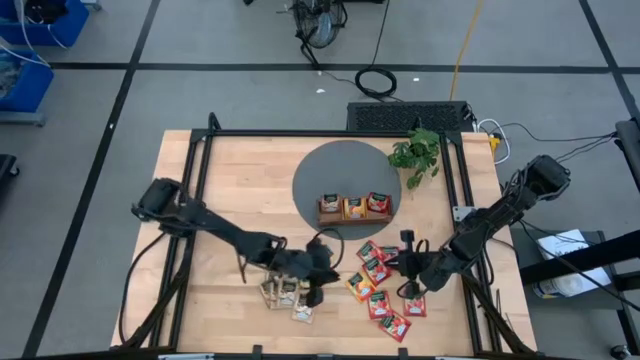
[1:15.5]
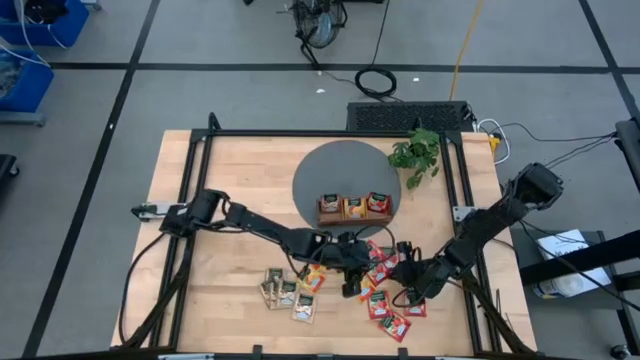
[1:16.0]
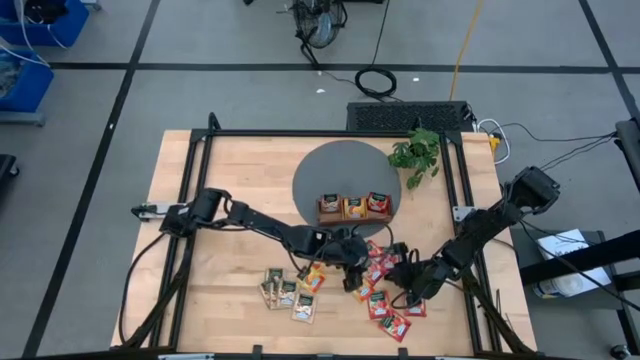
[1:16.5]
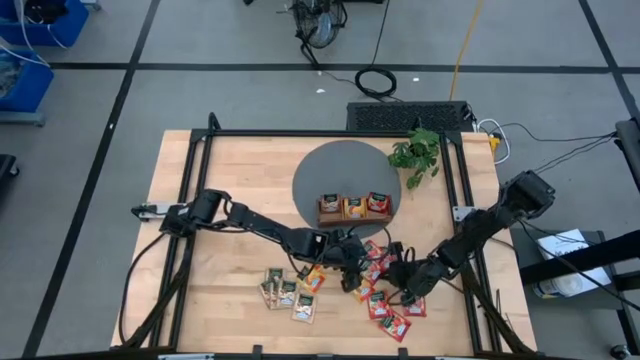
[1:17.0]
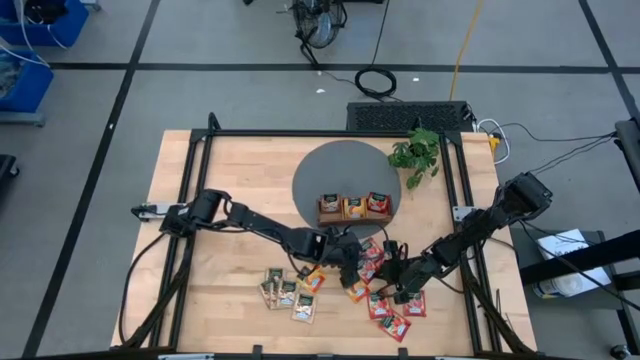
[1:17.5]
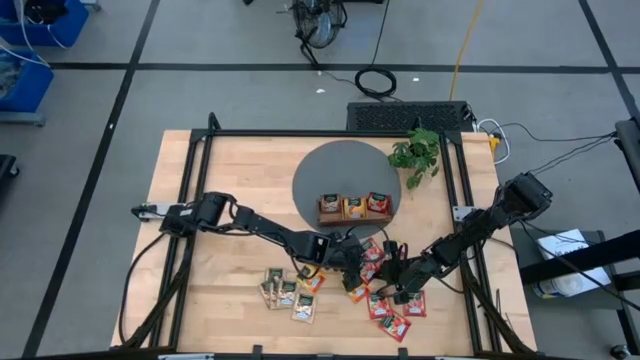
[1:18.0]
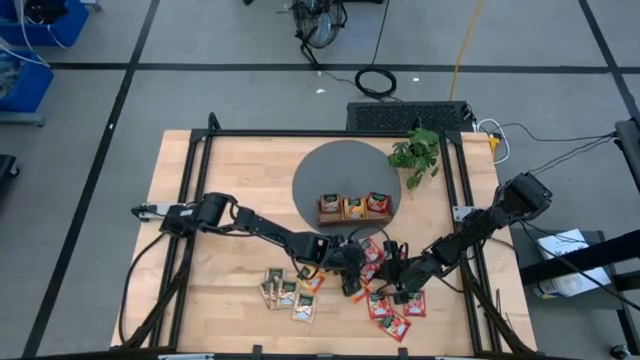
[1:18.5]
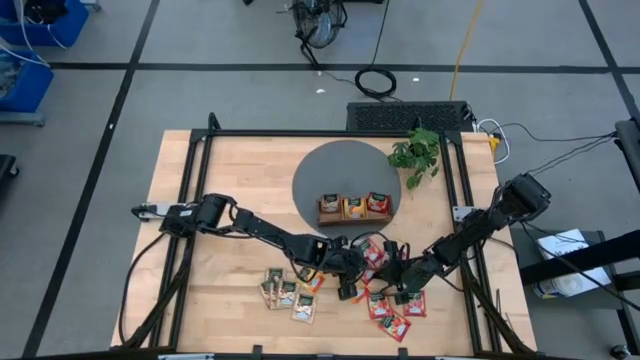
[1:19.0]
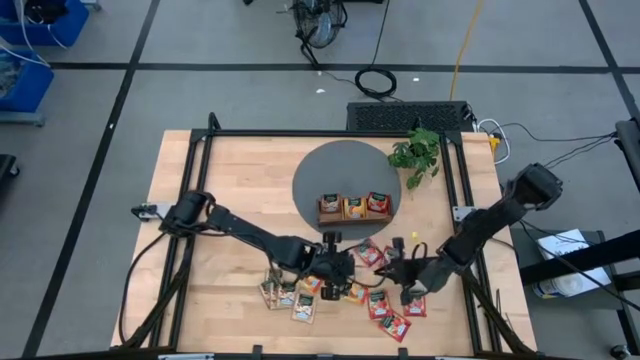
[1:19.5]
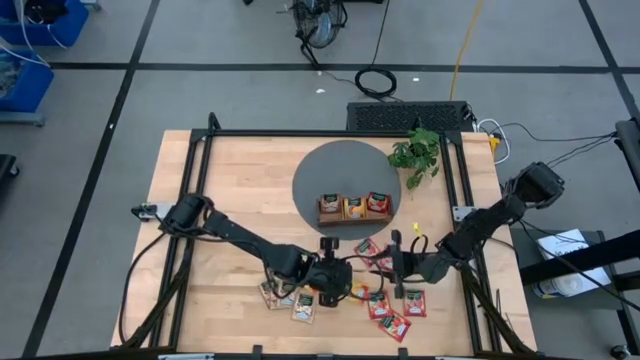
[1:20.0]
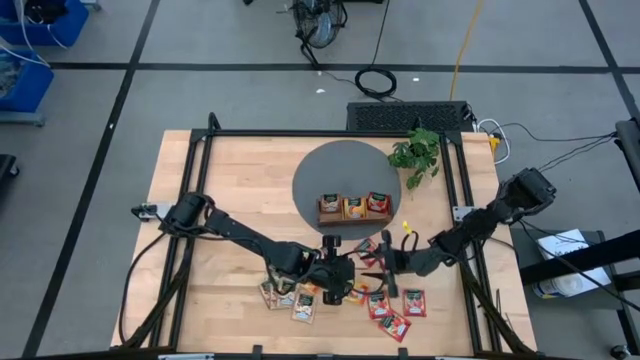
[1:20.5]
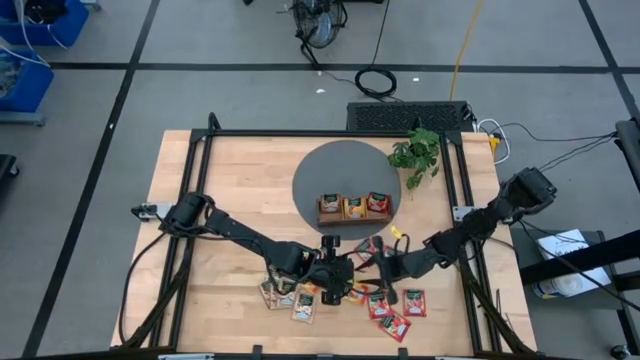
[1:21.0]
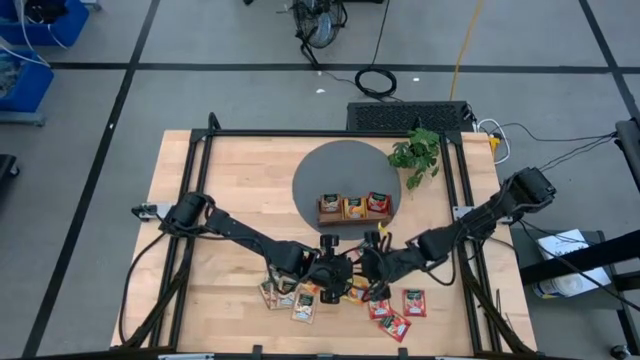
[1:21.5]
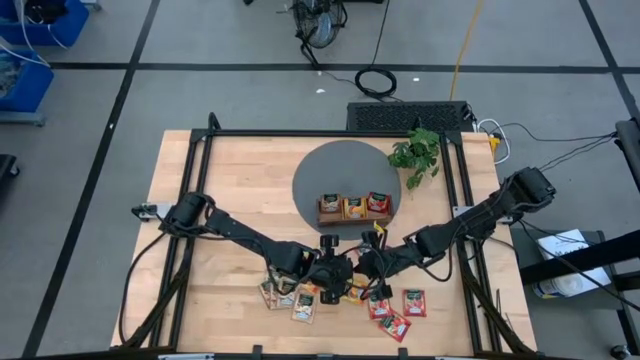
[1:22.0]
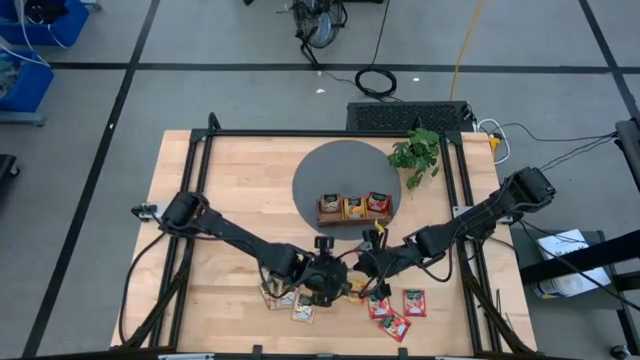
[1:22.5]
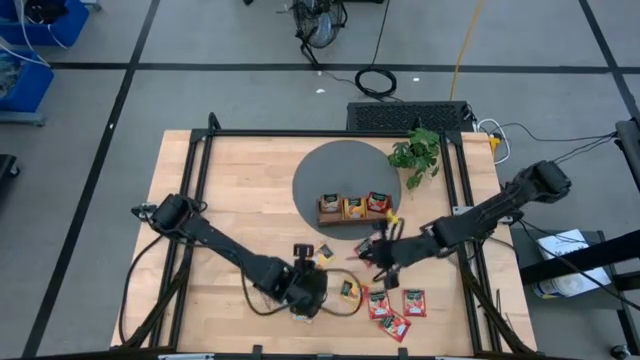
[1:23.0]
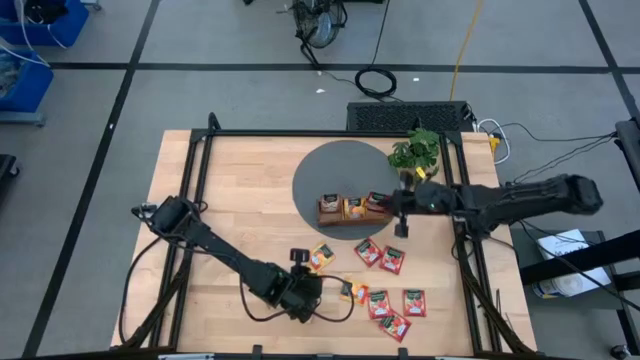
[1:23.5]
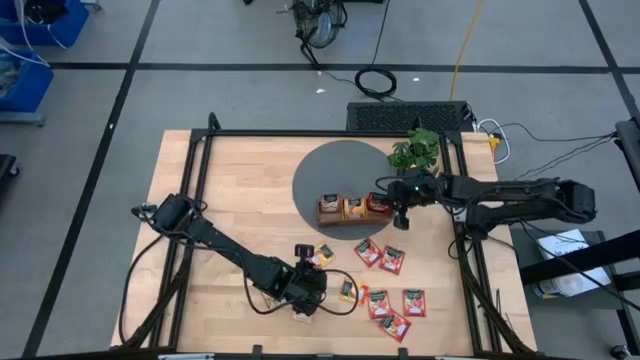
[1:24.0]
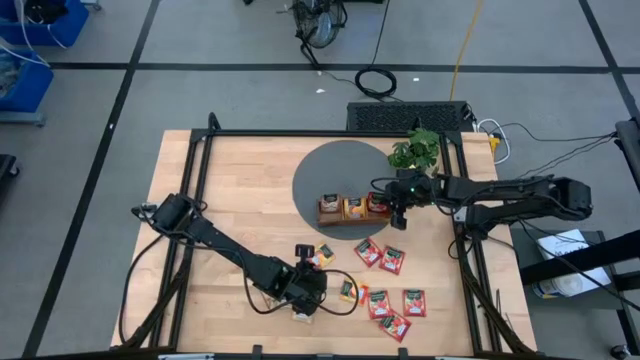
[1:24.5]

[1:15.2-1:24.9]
Task: Pick & Place Tea
Put the red tea bag into the right section of the wooden organizer

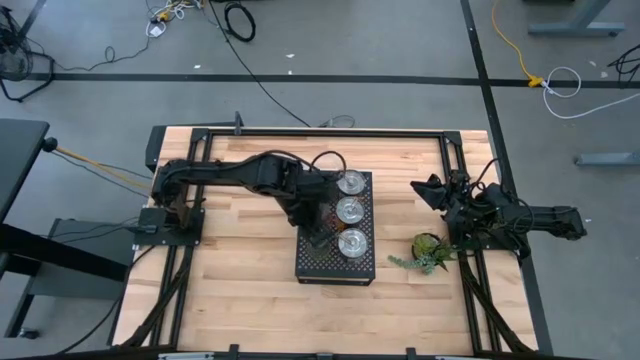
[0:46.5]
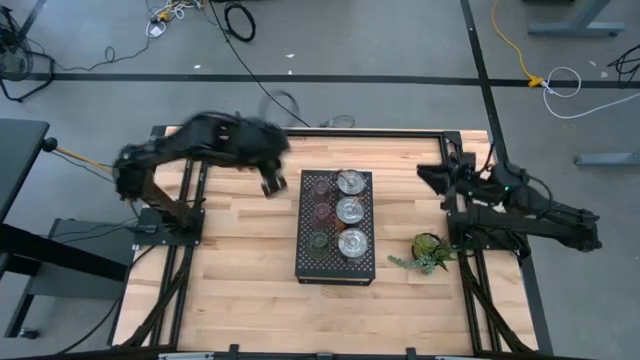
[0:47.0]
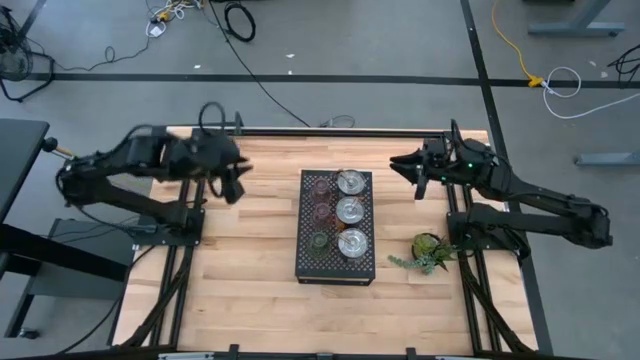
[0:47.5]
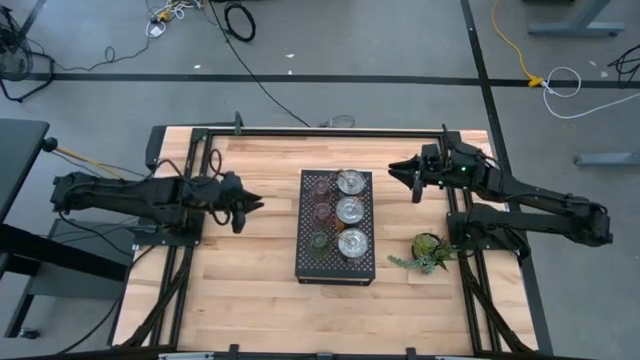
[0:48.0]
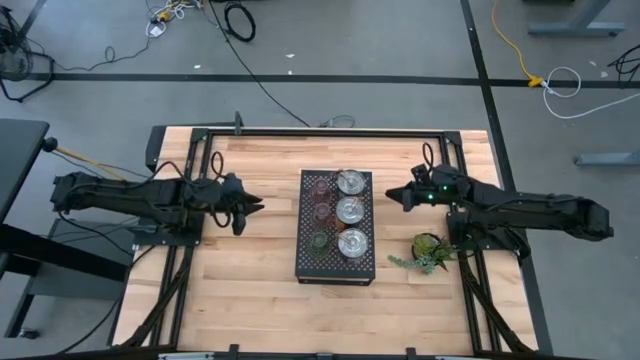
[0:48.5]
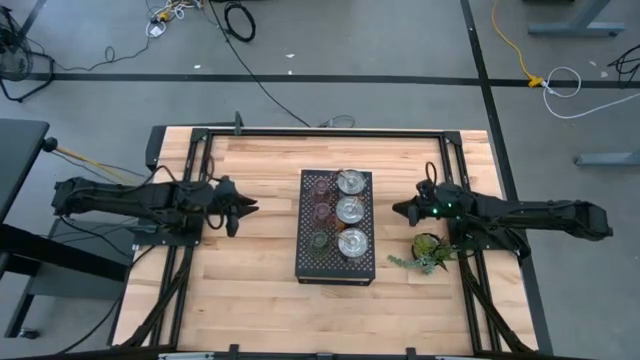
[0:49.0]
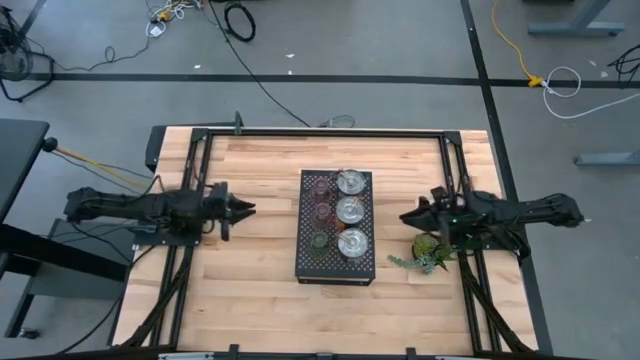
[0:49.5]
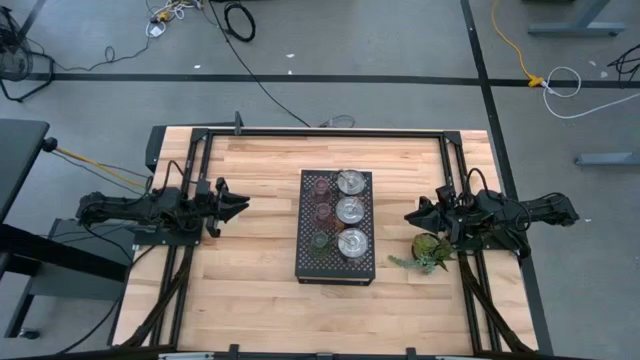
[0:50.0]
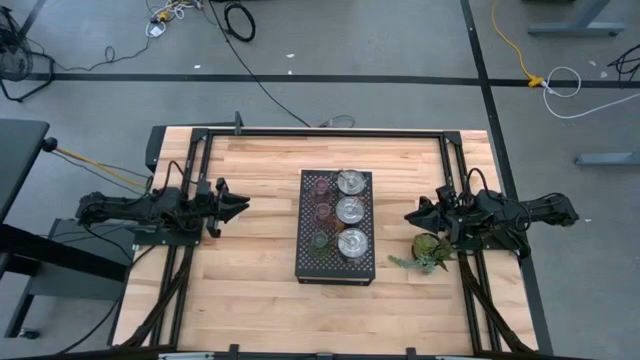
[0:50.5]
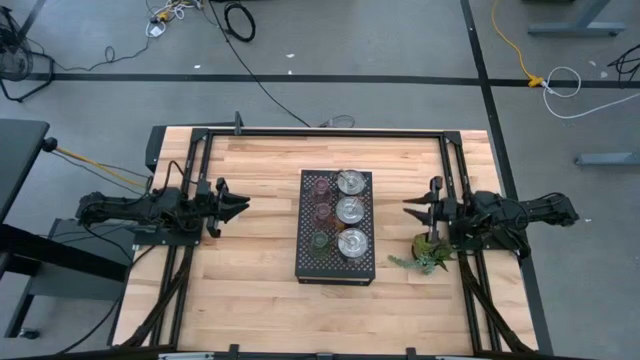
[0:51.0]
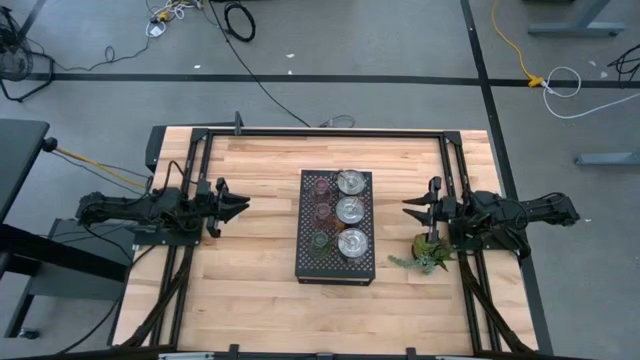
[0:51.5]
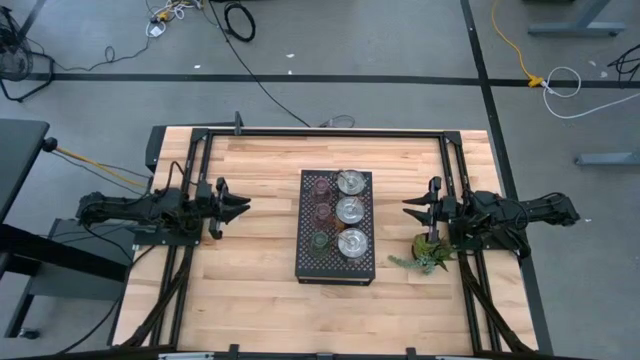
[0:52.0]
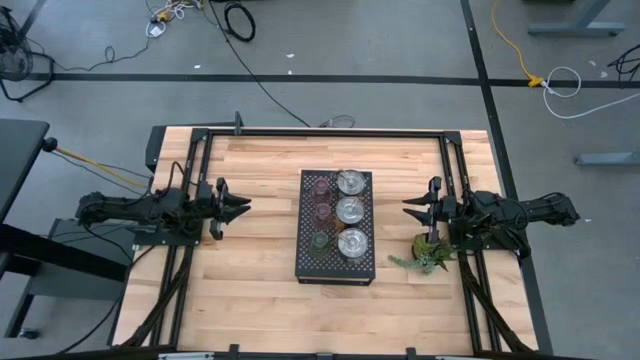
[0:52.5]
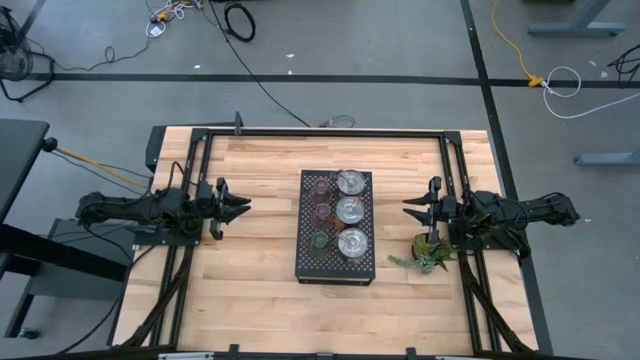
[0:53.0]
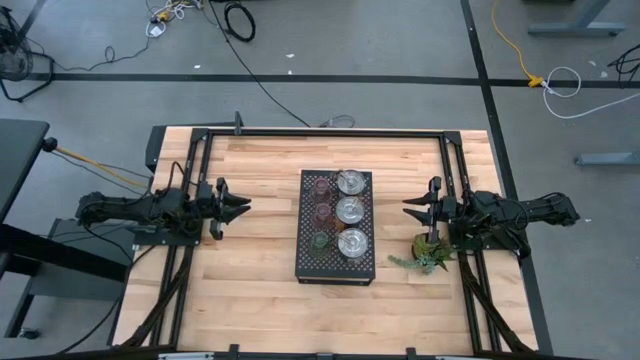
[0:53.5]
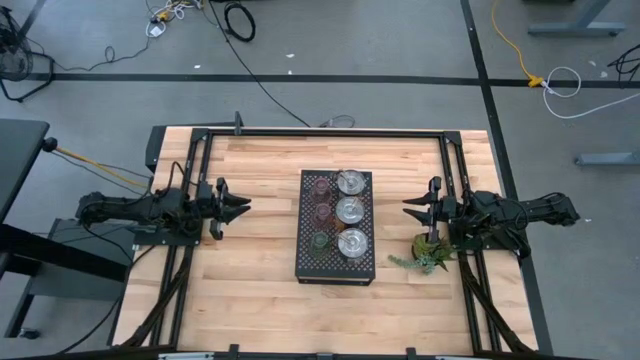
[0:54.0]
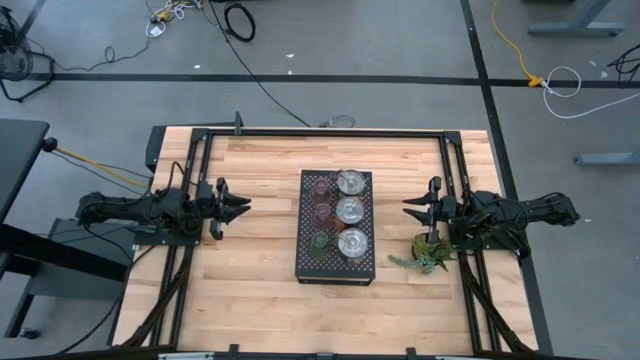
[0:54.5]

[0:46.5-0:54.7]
Task: Pick & Place candle stick holders
Return to Home Position
